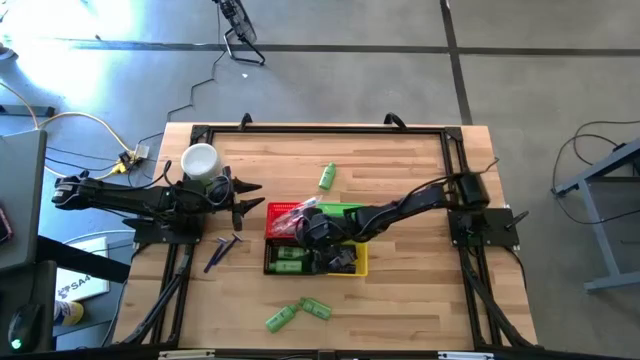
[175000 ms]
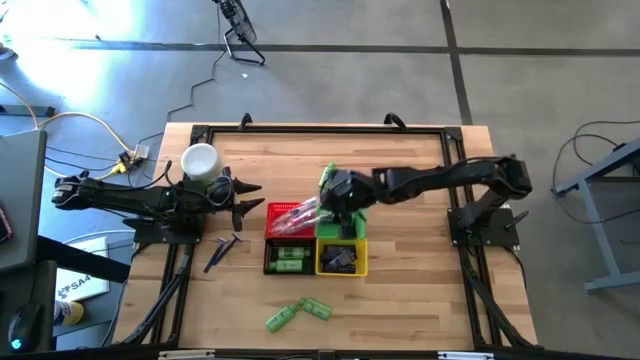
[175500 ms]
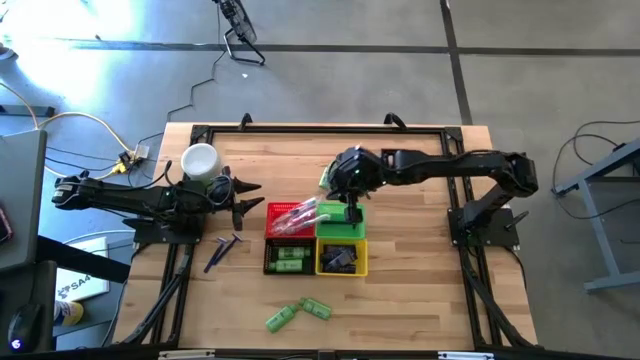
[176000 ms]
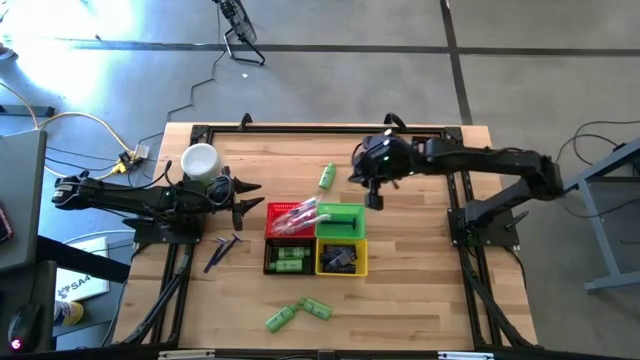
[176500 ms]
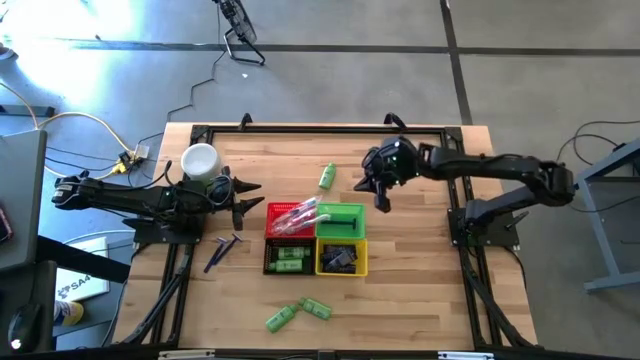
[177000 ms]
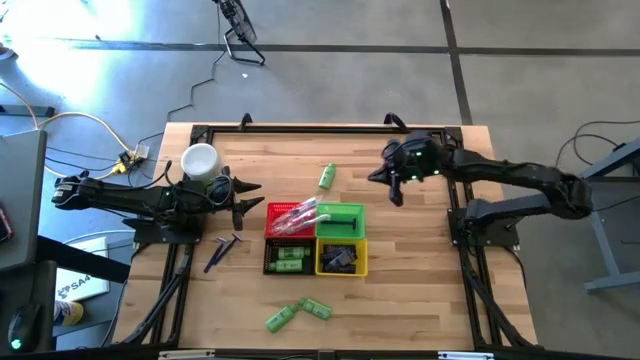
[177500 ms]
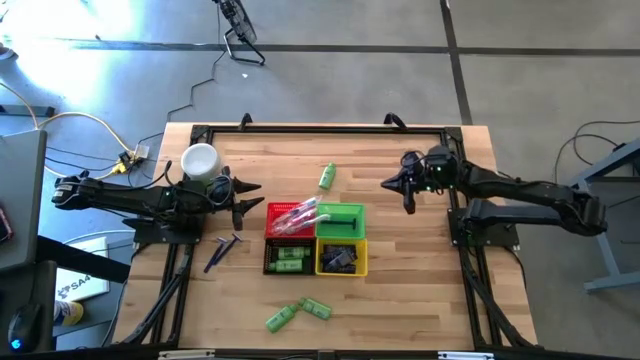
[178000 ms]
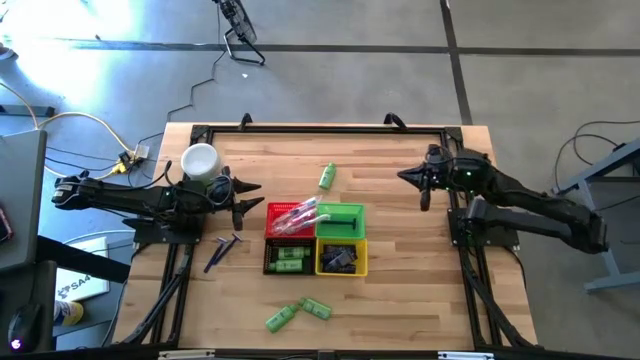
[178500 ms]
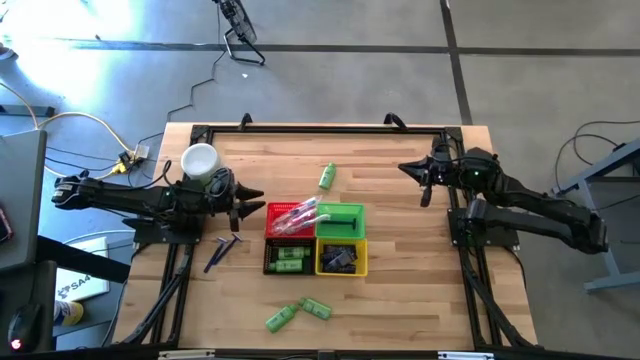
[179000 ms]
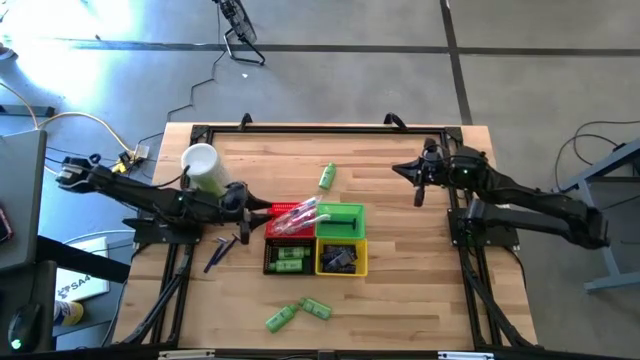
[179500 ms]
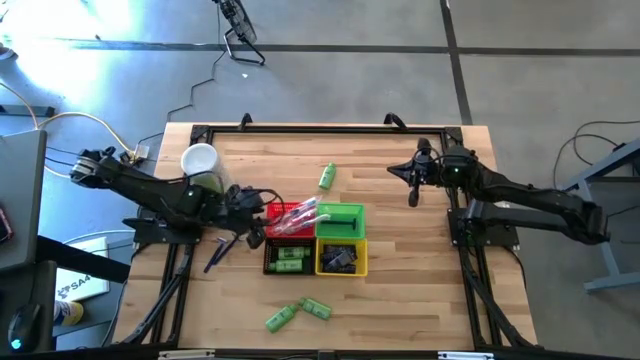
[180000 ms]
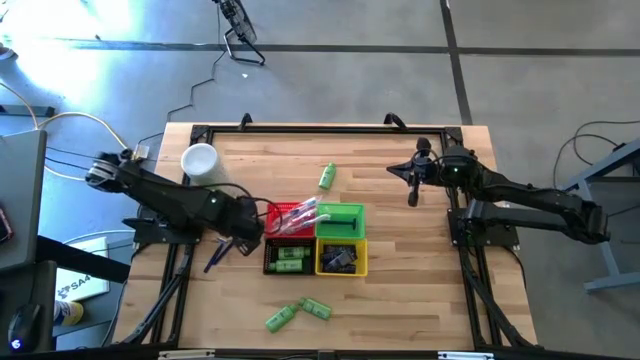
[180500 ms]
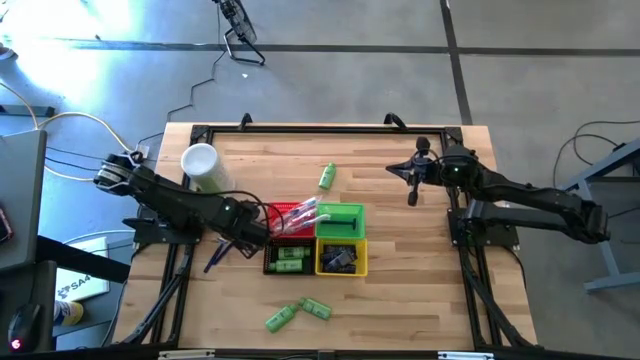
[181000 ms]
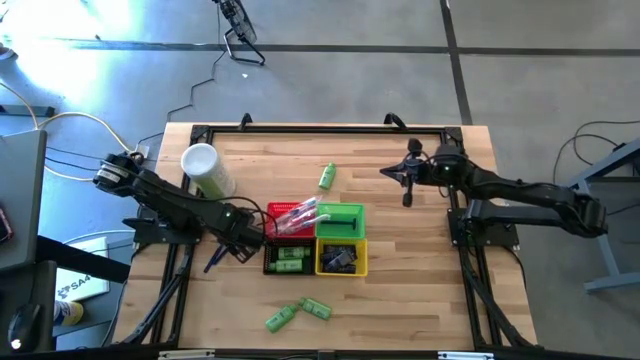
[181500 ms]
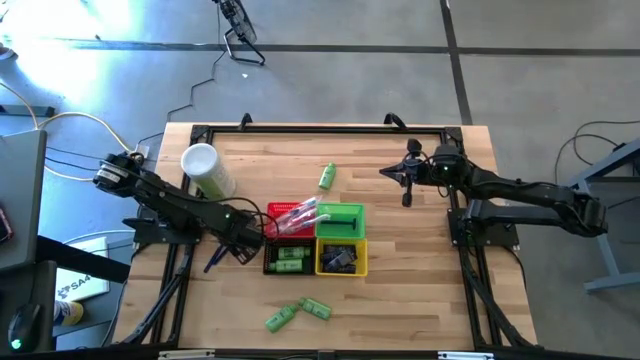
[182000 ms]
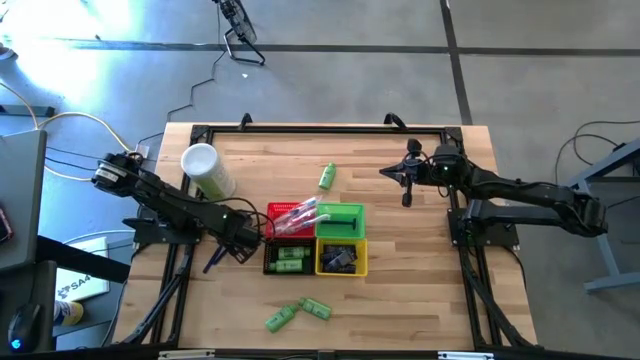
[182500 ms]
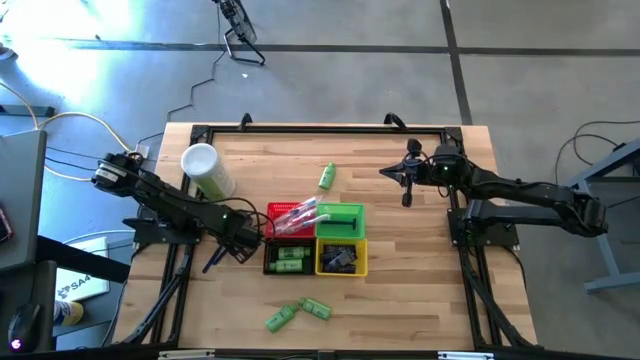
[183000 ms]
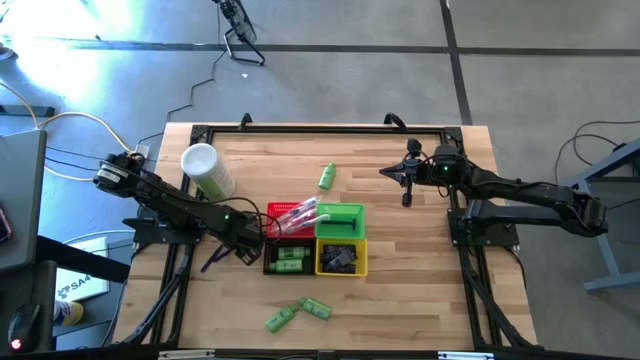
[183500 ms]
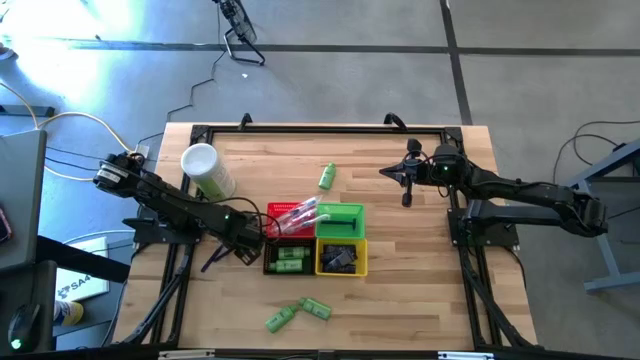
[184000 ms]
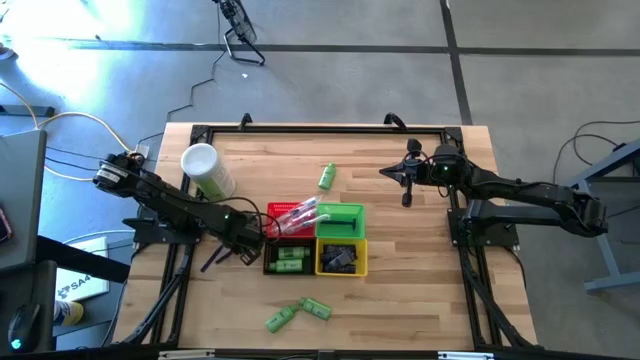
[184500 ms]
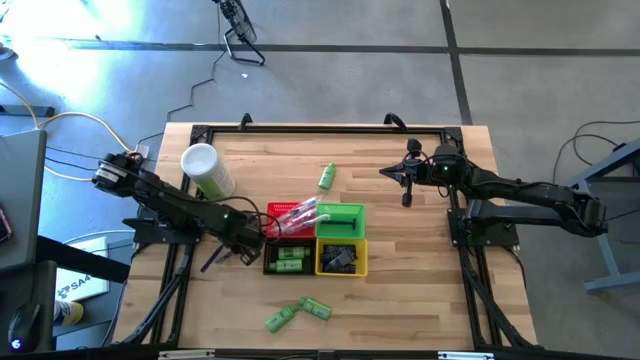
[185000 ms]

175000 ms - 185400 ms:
Task: Pick & Place Travel size toiletries
Put the blue razor into the green bin

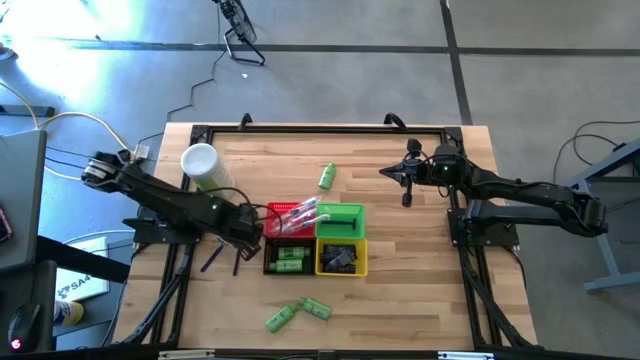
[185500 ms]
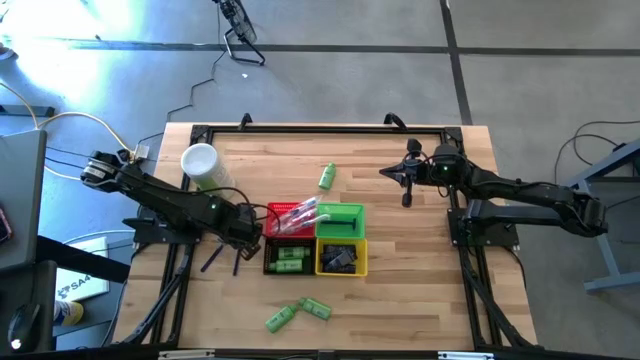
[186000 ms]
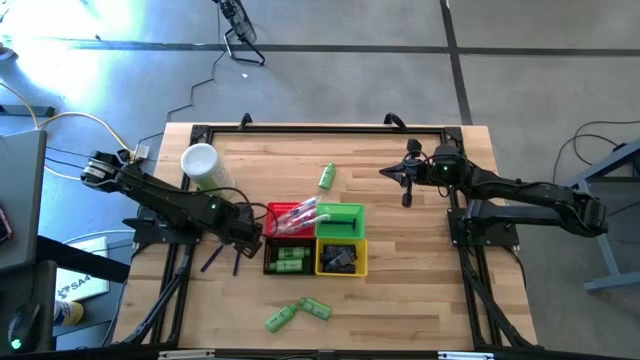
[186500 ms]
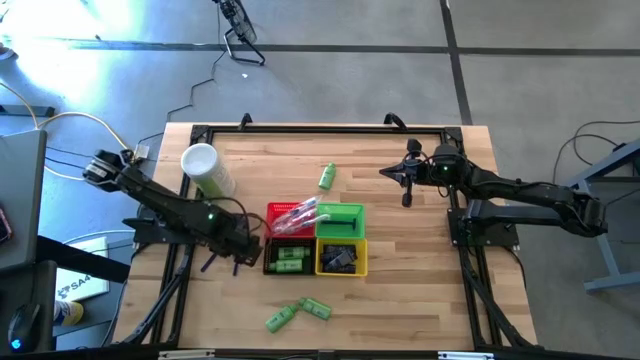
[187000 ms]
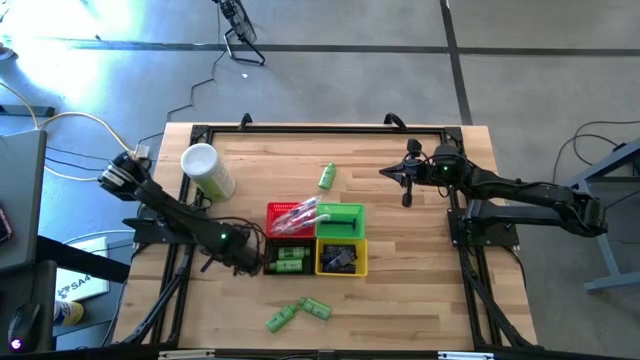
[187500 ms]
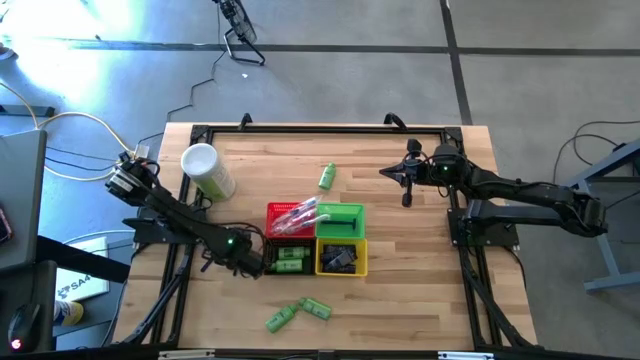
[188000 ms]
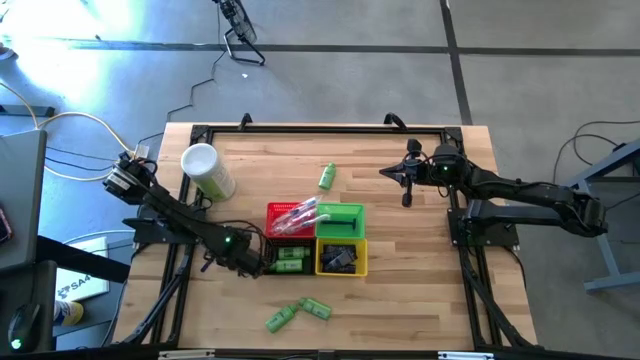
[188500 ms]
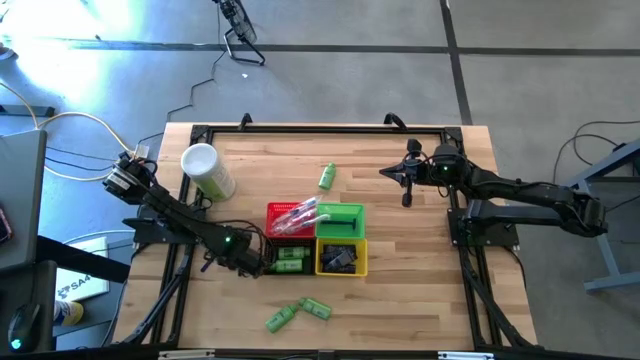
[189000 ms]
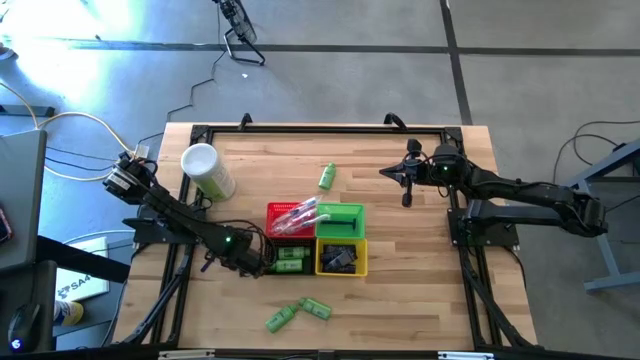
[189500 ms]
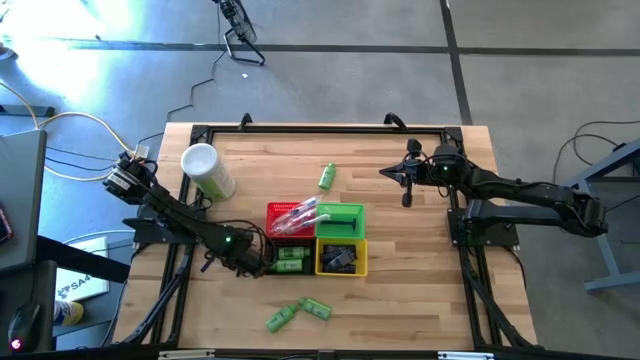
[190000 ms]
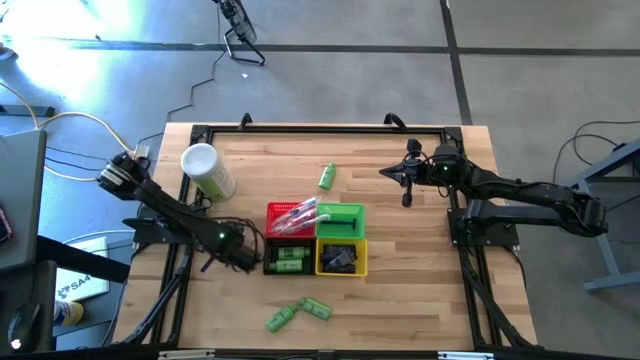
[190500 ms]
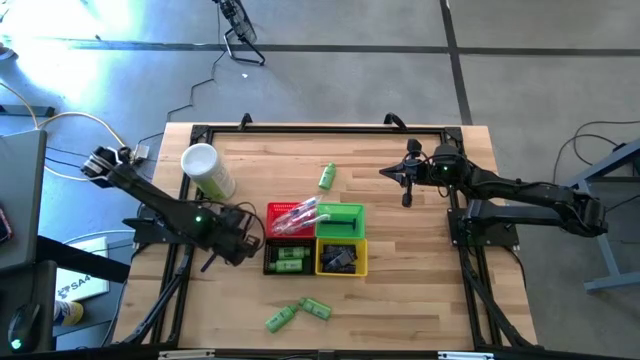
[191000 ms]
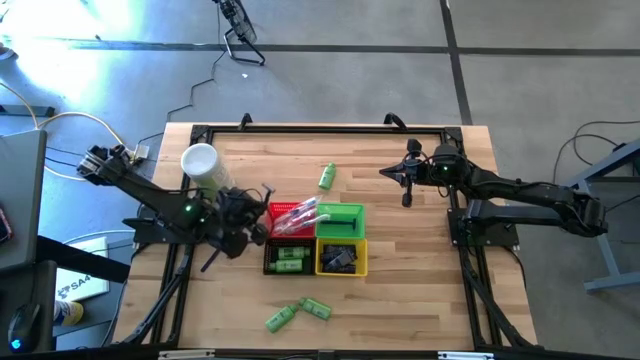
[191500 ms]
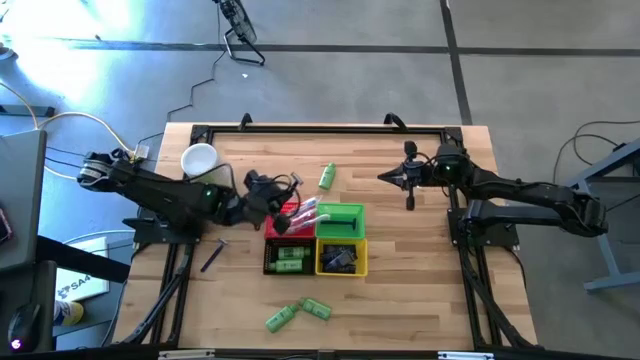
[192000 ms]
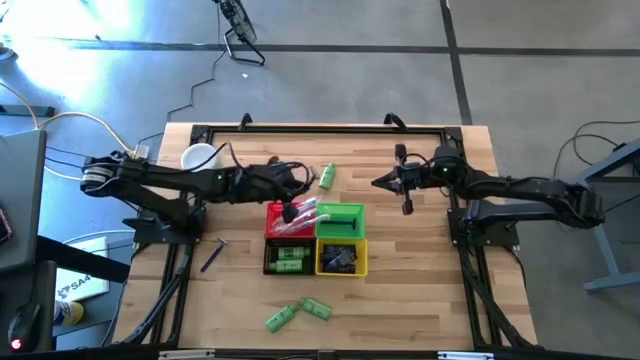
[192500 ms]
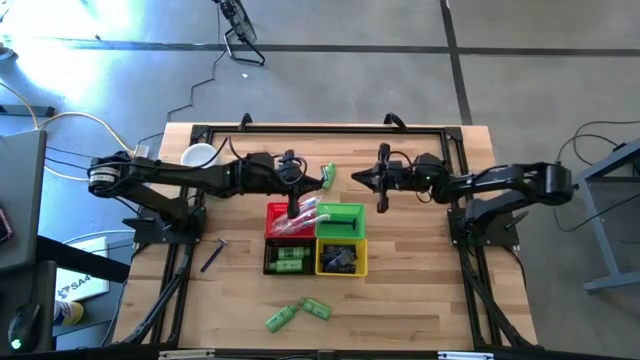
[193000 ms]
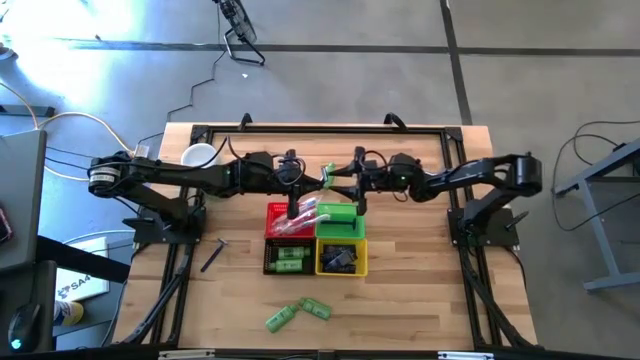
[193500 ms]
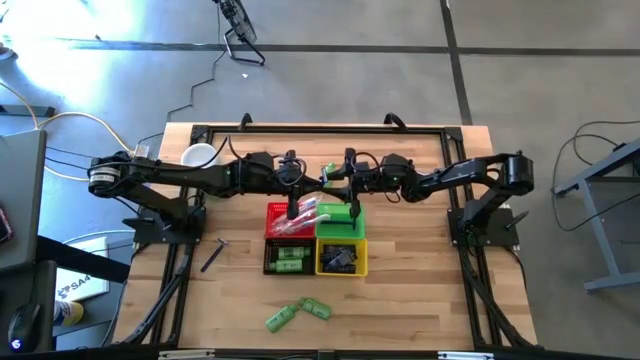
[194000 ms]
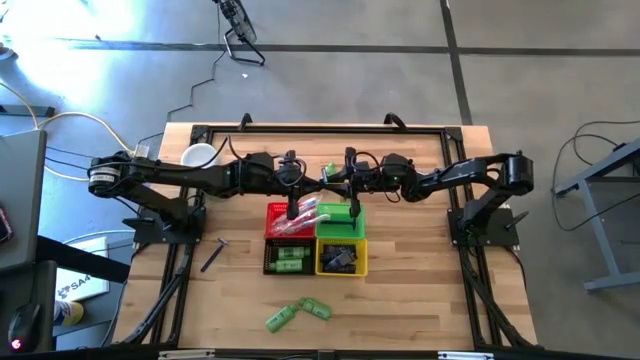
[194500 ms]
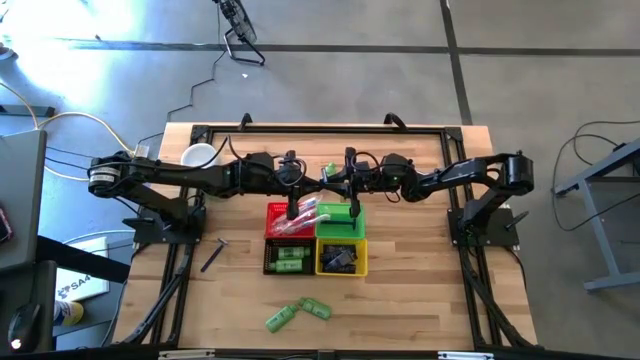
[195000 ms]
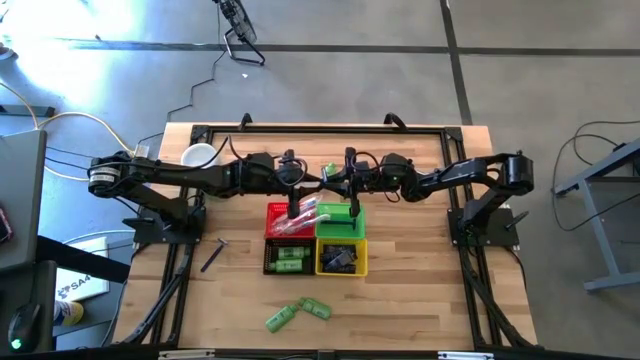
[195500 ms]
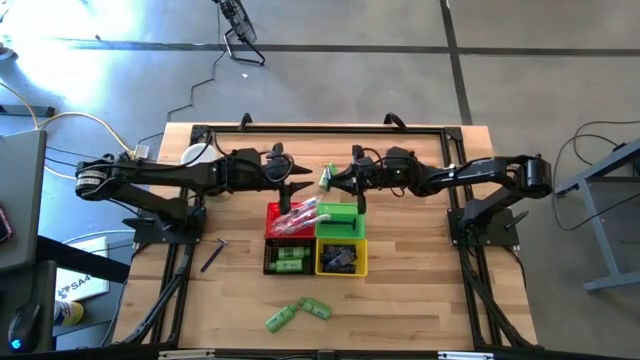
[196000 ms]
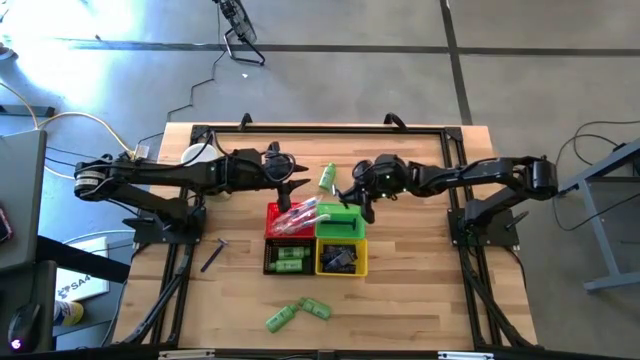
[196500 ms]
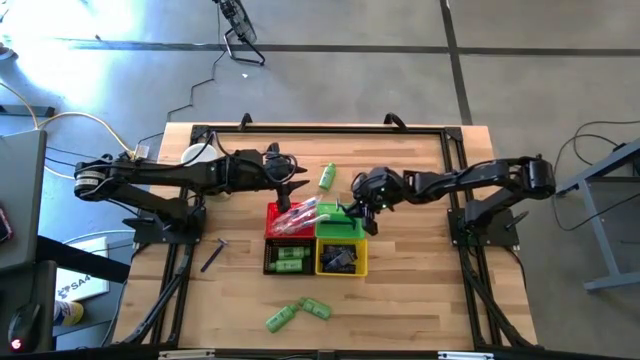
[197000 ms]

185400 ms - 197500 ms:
Put the blue razor into the green bin
